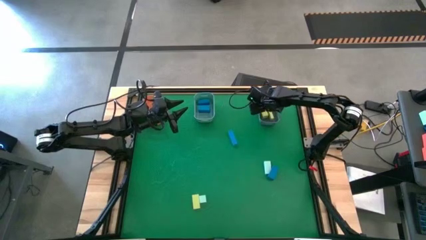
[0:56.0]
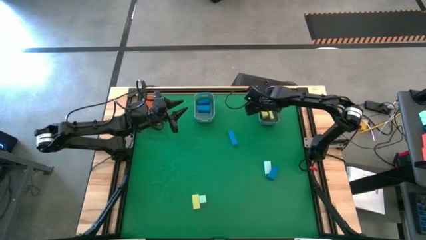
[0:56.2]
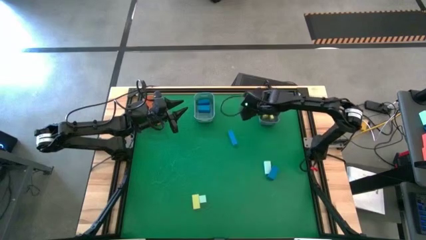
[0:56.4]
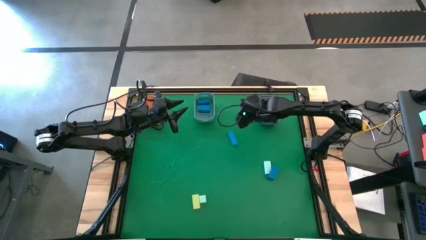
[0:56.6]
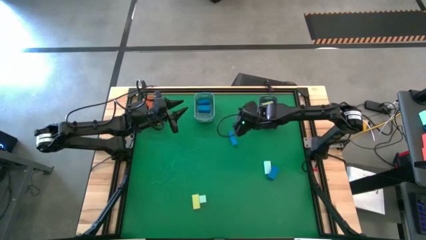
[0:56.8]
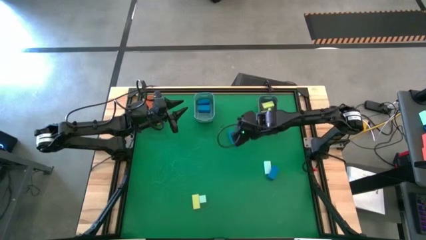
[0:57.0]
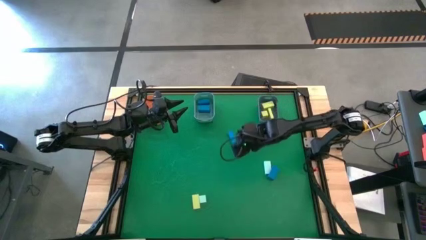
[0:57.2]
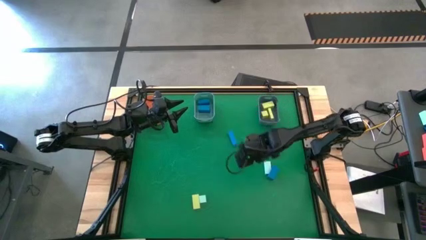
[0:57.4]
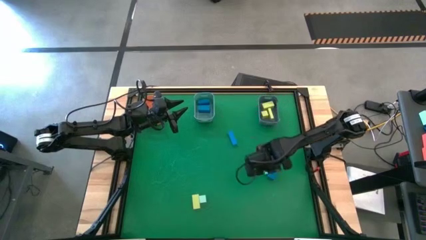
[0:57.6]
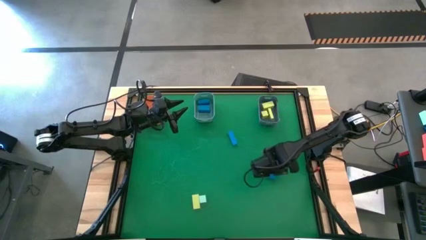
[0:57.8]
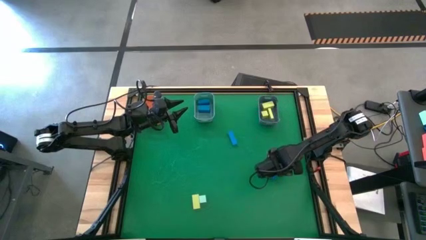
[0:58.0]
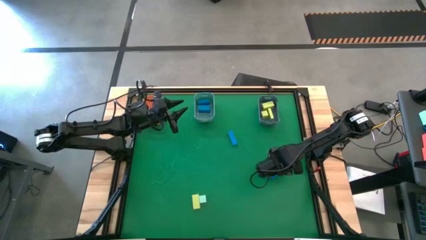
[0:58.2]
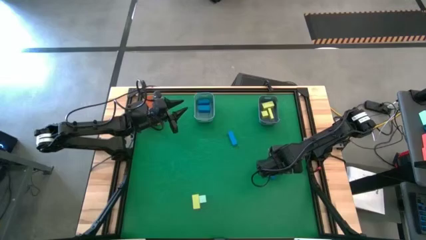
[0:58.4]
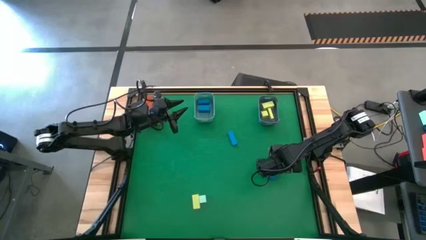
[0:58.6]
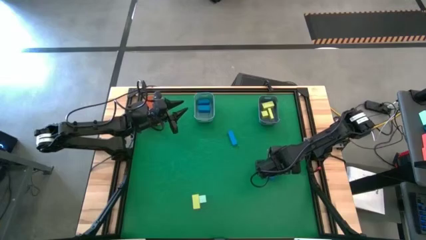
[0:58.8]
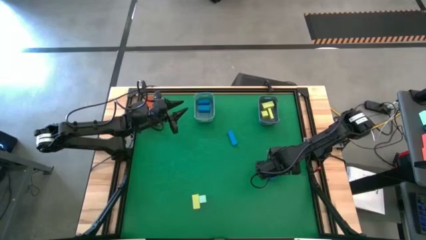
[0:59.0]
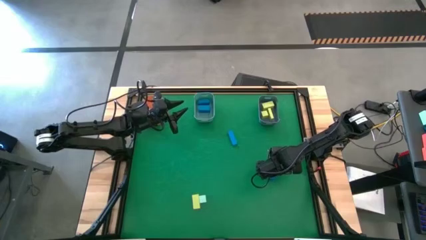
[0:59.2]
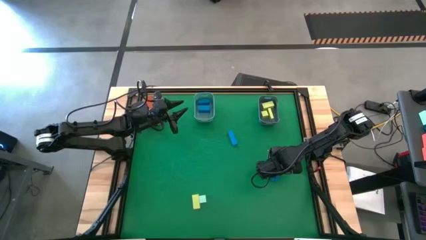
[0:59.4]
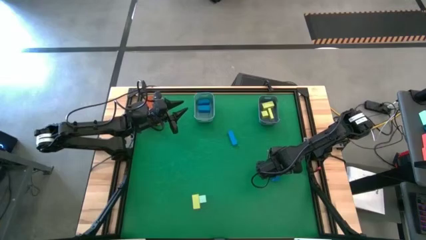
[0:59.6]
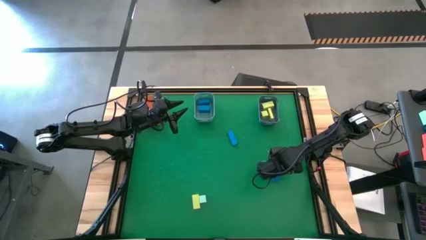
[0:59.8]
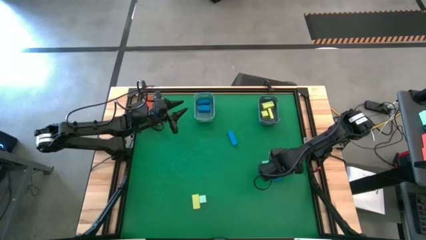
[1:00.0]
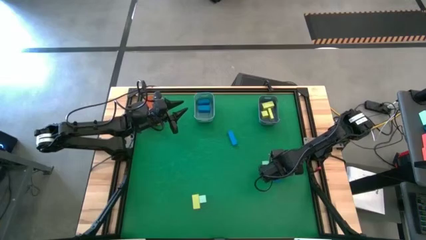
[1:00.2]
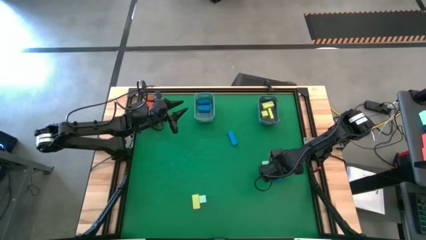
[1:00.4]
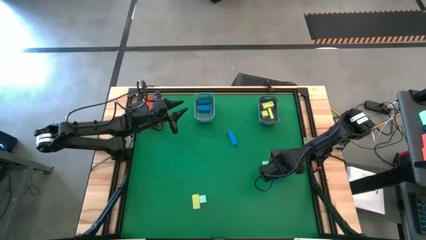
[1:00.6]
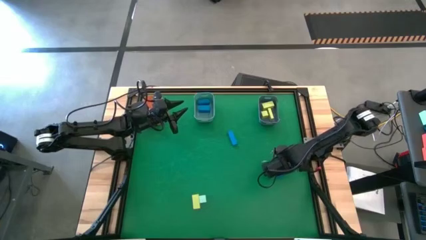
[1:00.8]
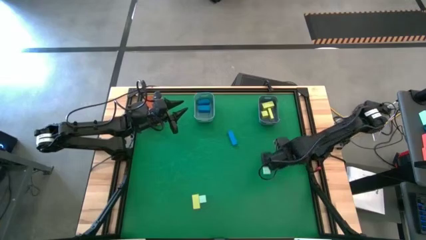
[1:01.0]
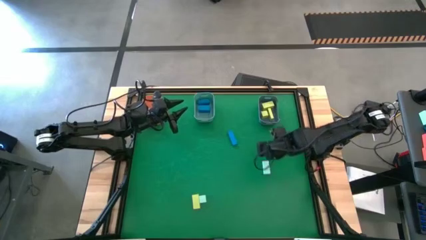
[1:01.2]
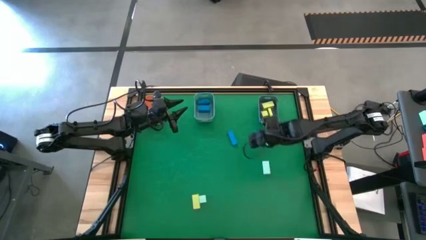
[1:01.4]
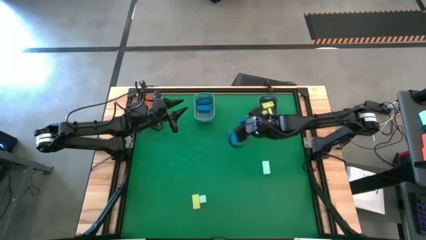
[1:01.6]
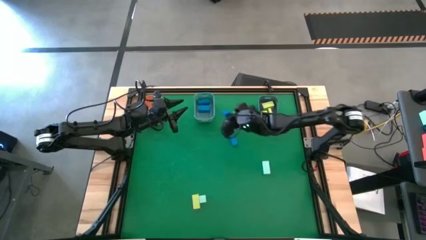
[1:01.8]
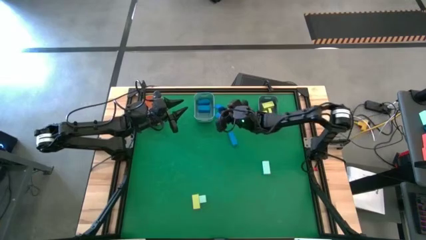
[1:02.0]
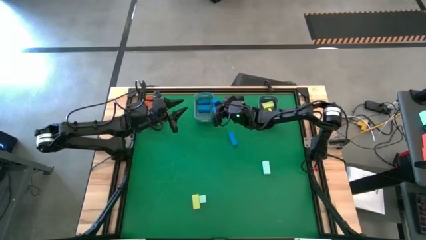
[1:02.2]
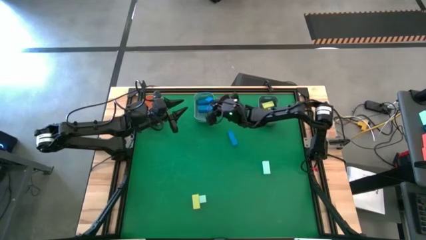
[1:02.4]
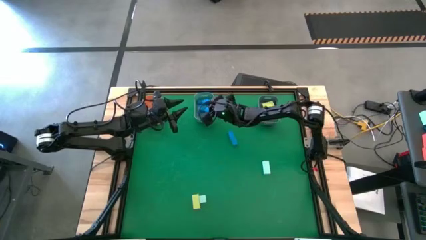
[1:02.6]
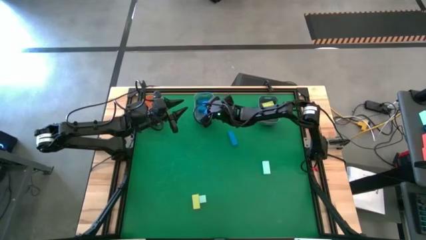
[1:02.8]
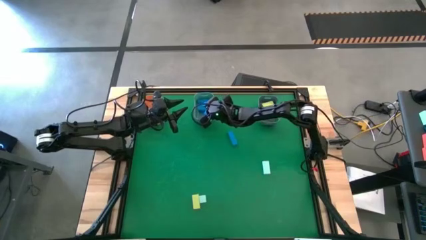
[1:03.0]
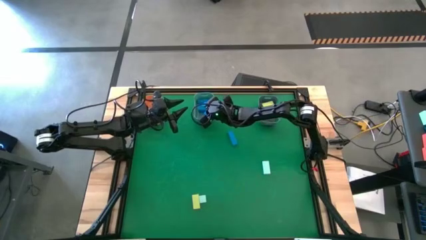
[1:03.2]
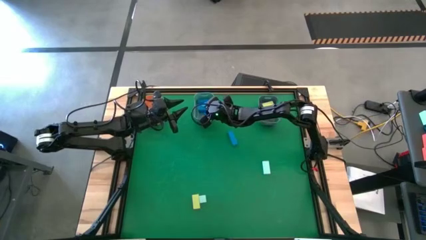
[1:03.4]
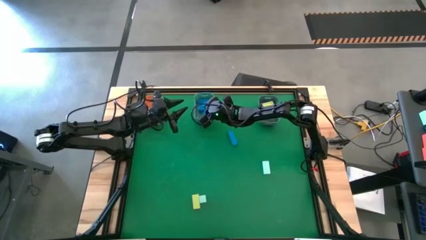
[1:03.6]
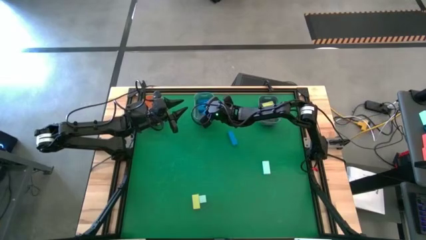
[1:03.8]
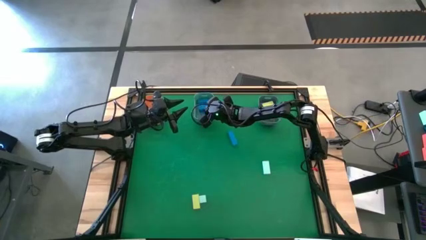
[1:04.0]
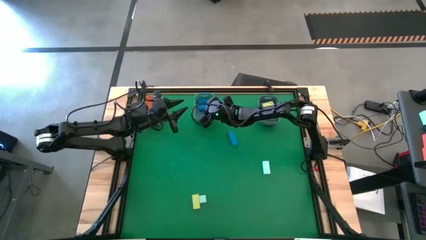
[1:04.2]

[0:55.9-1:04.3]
Task: Sort & place blocks by color
Put the blue block into the blue bin

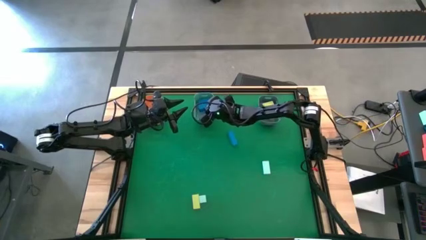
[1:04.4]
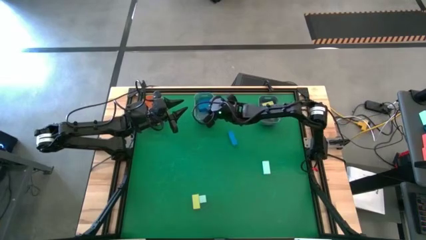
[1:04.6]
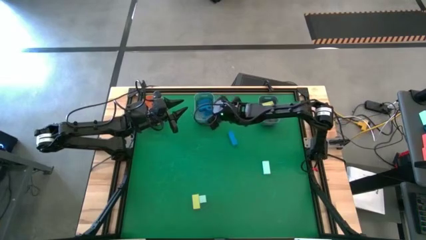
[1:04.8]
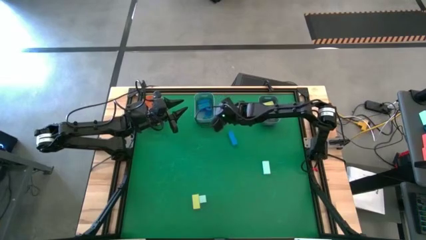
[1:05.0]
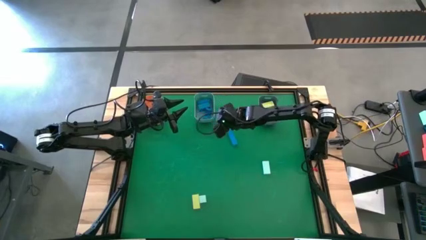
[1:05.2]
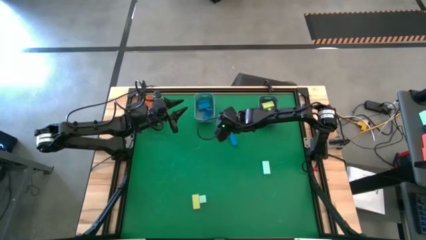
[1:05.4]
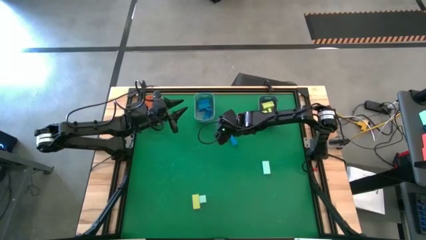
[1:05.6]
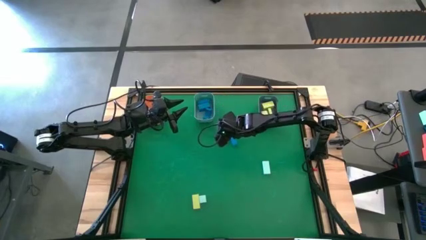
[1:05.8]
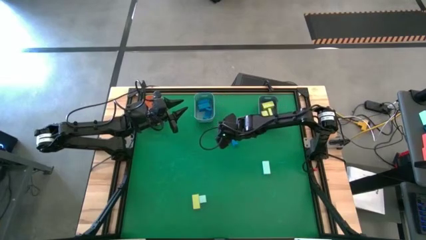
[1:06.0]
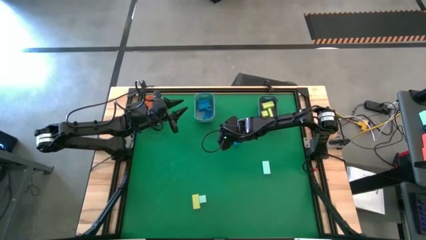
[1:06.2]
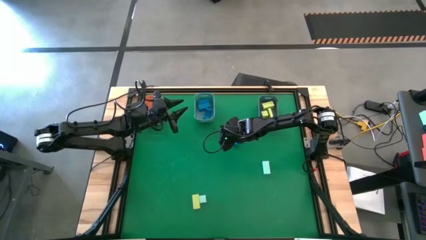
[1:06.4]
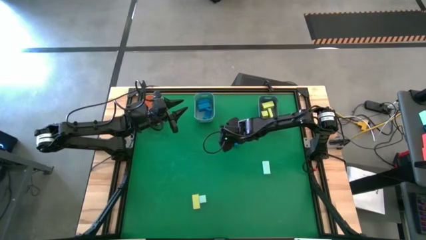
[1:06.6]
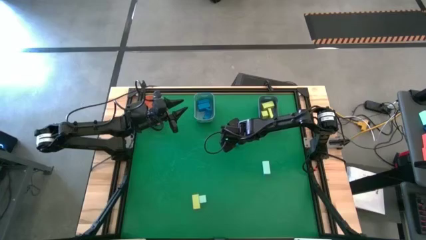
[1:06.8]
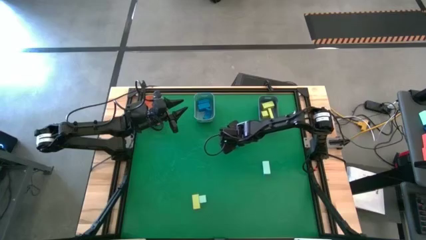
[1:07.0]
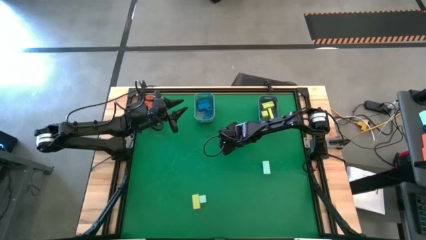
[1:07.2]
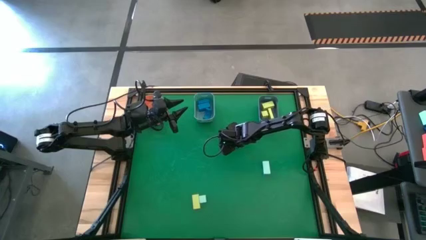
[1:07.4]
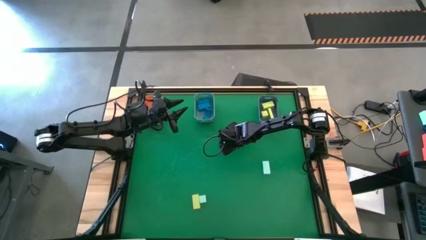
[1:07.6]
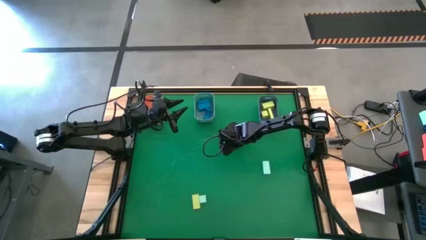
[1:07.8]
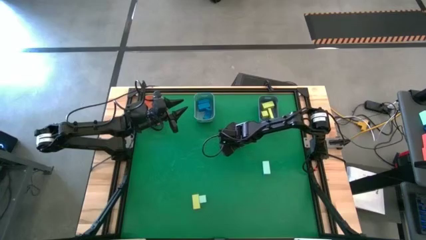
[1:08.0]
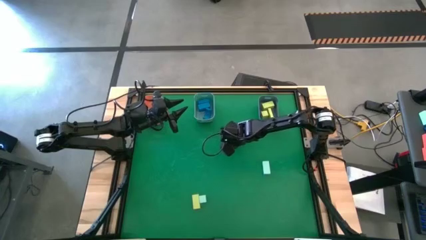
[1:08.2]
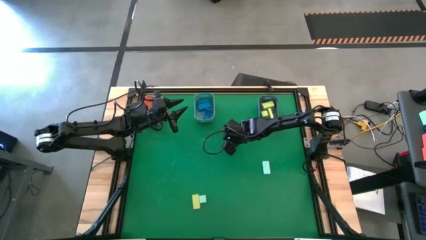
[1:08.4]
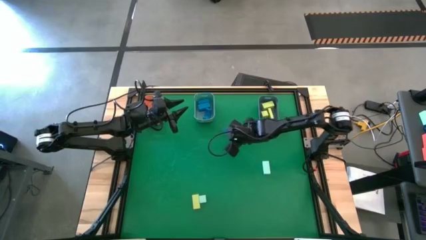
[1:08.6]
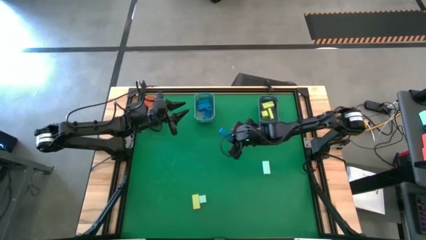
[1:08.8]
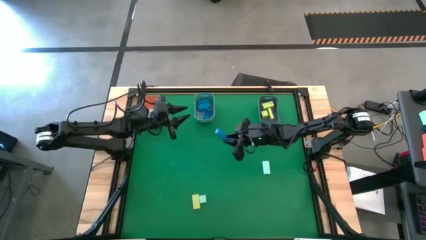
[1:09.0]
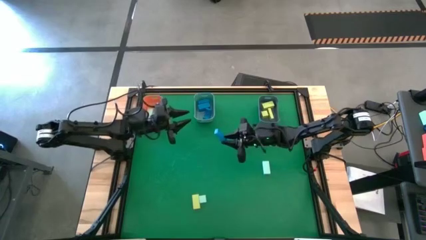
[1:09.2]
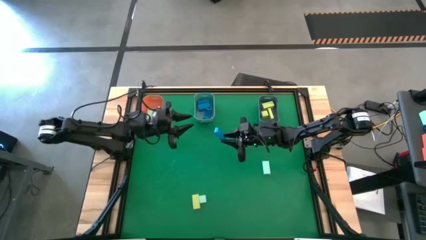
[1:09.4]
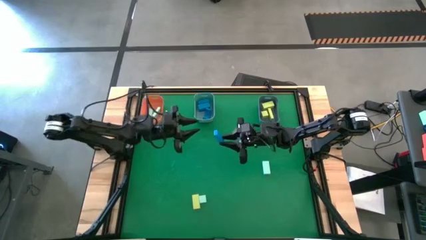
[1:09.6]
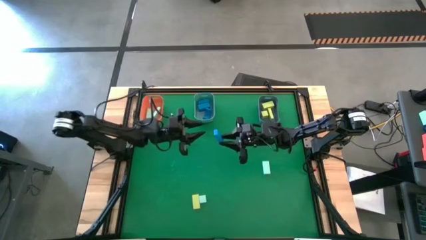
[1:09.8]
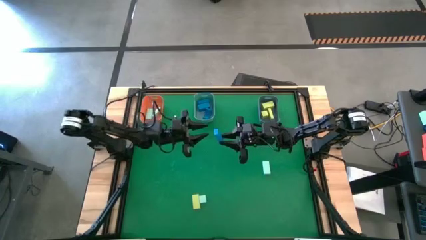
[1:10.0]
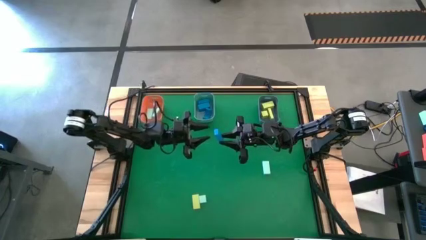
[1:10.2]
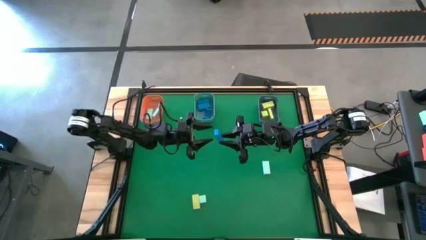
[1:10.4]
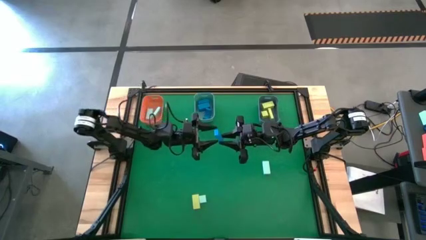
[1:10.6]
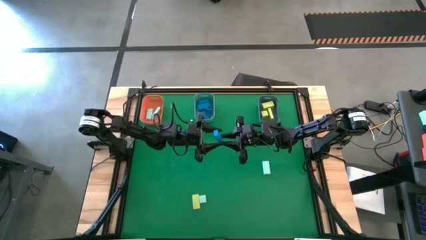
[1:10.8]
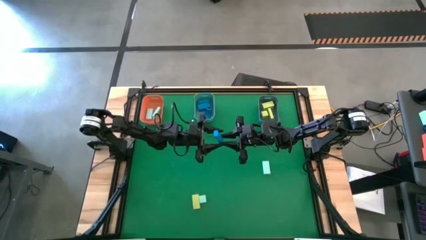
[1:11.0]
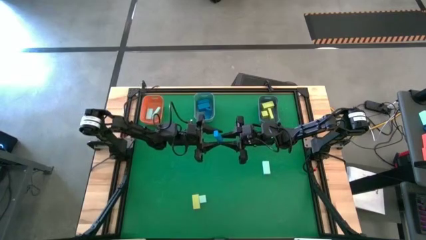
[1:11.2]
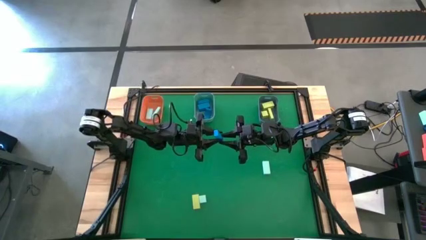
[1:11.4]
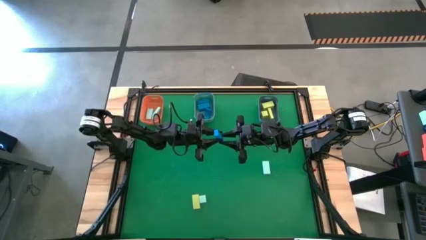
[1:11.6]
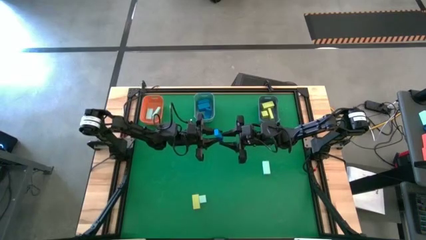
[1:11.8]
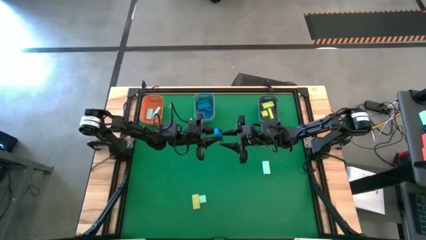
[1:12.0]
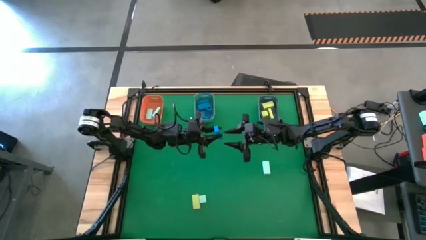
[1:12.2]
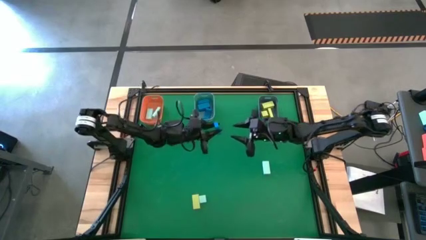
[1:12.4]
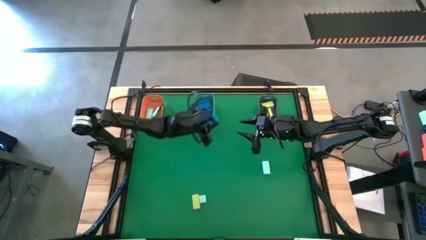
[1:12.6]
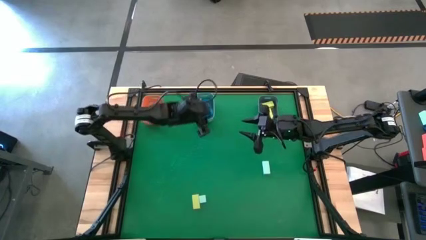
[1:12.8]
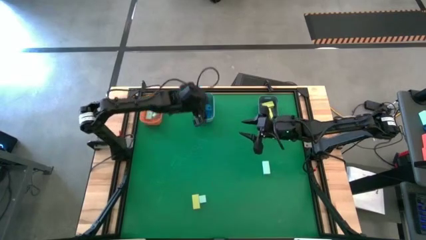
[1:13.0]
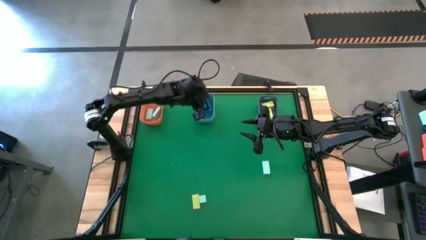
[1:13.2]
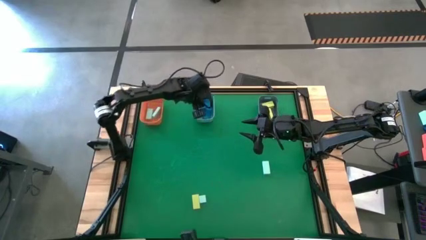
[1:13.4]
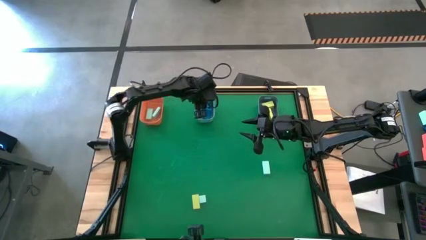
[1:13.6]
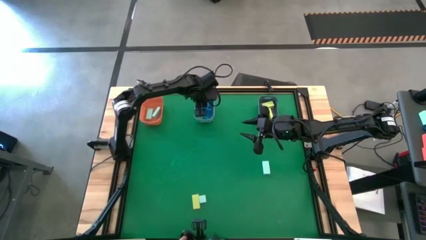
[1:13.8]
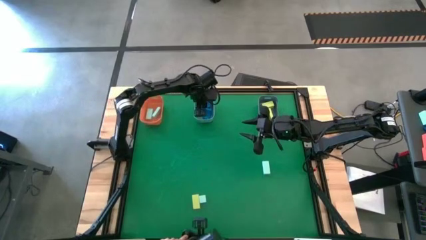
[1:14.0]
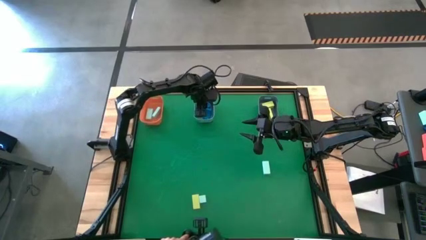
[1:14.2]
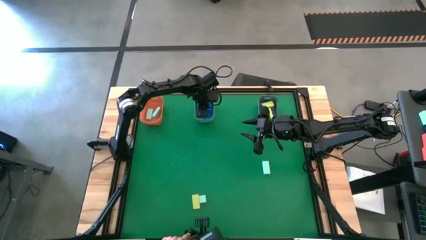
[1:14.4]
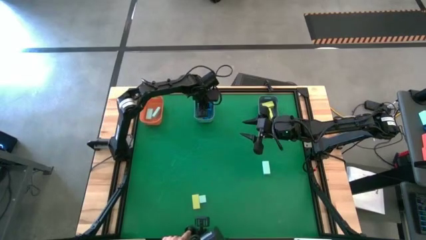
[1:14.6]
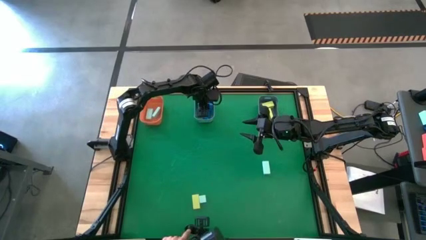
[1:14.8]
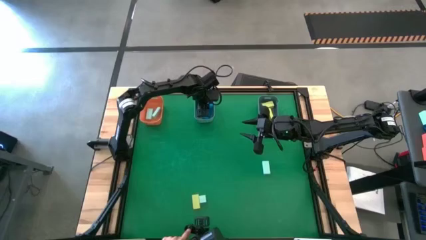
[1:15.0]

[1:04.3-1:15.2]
Put the blue block into the blue bin
